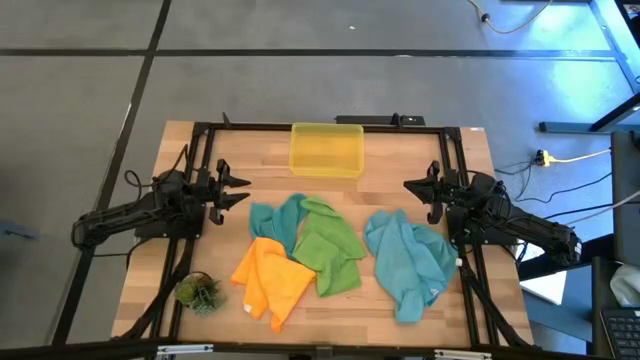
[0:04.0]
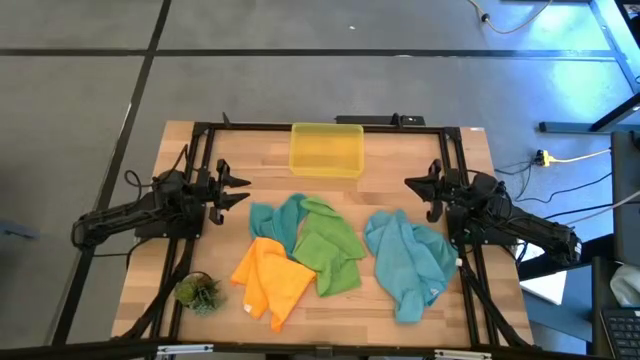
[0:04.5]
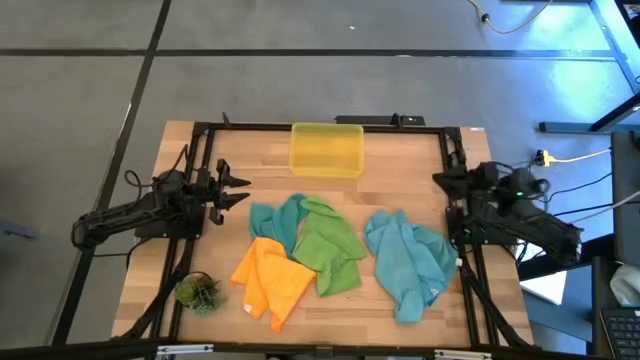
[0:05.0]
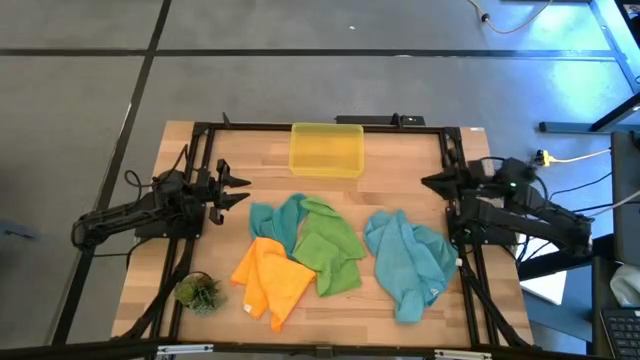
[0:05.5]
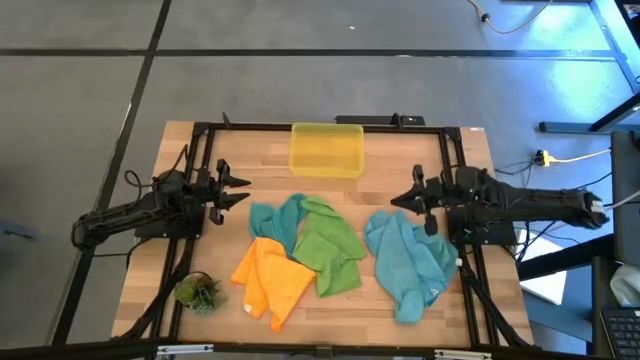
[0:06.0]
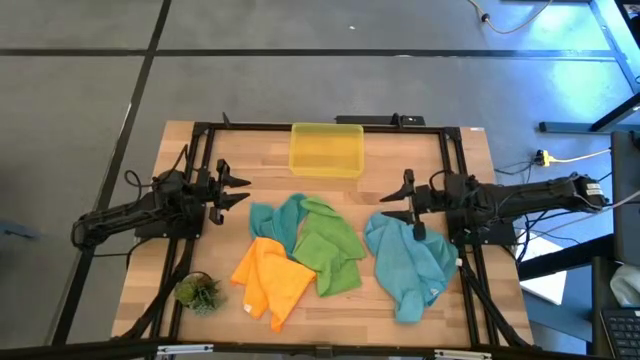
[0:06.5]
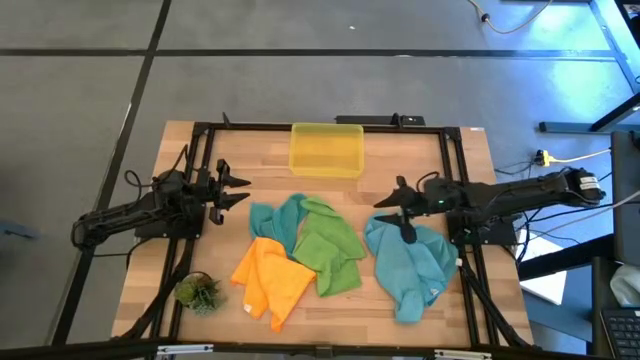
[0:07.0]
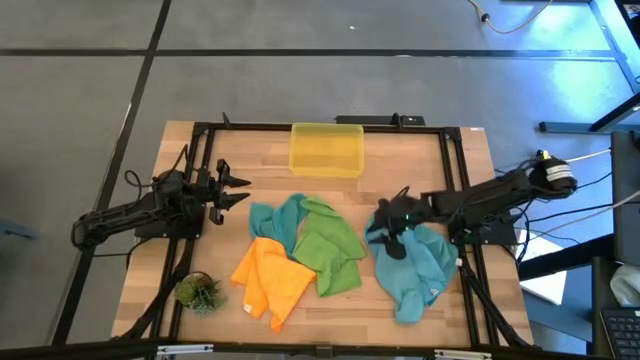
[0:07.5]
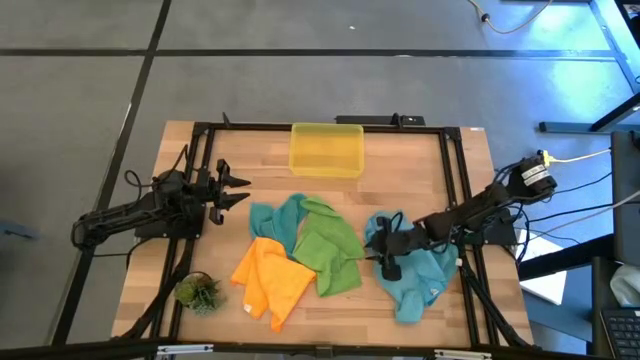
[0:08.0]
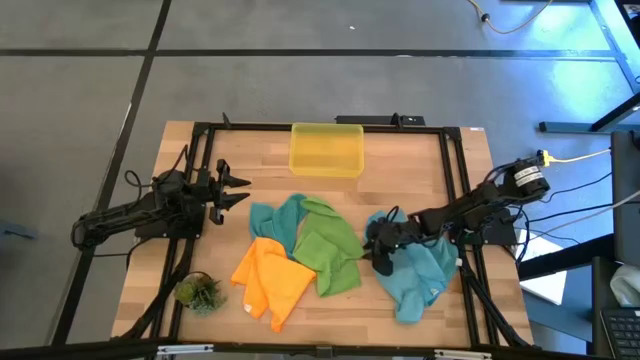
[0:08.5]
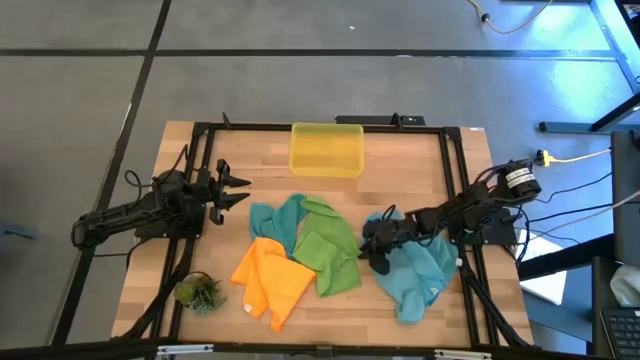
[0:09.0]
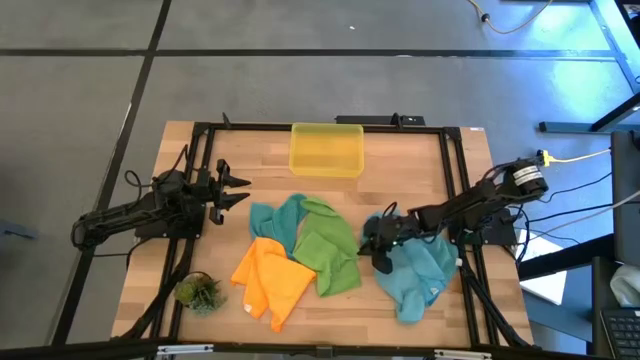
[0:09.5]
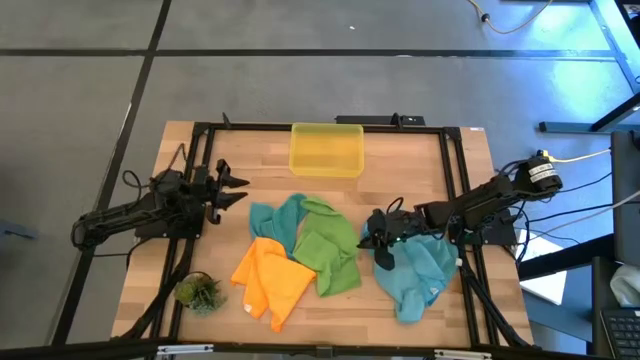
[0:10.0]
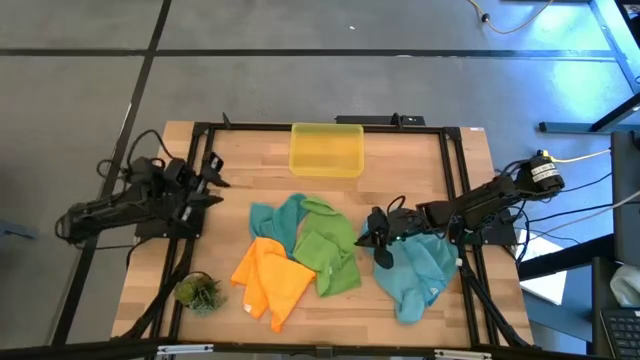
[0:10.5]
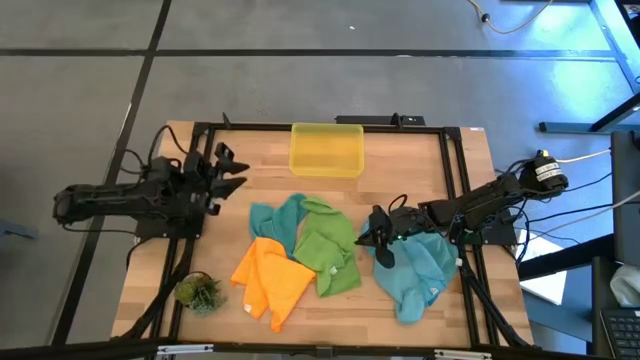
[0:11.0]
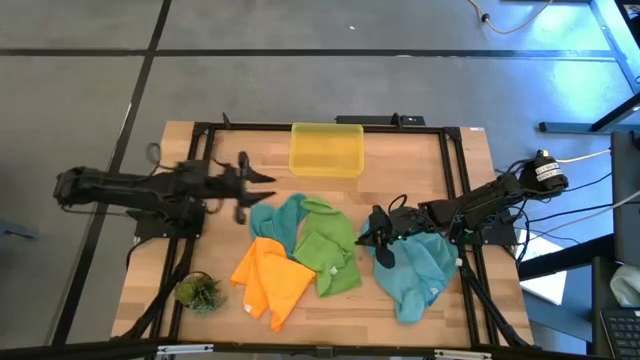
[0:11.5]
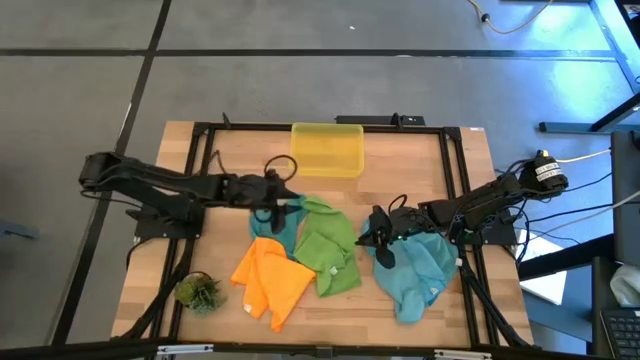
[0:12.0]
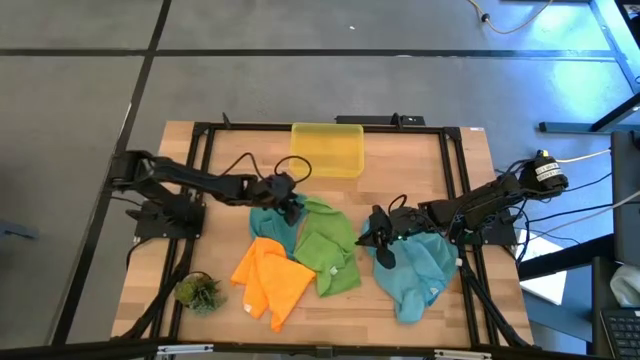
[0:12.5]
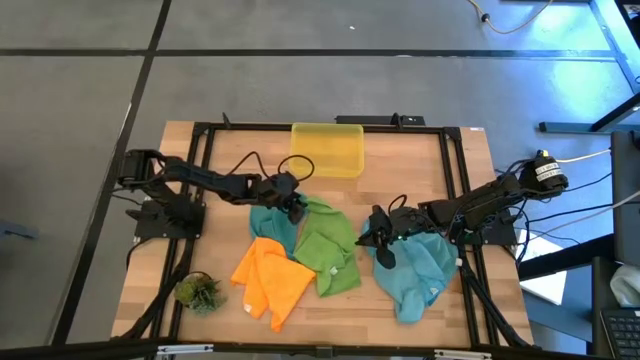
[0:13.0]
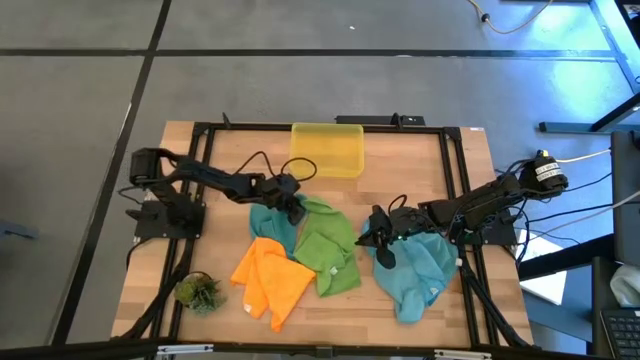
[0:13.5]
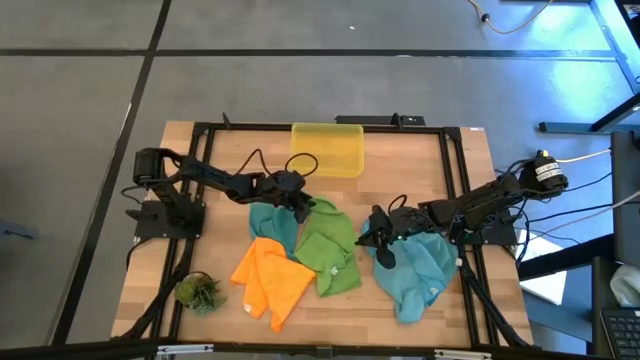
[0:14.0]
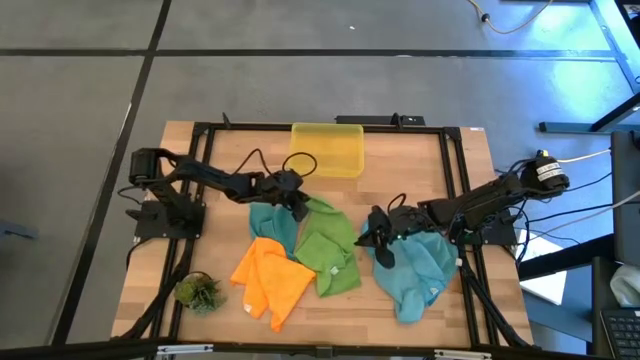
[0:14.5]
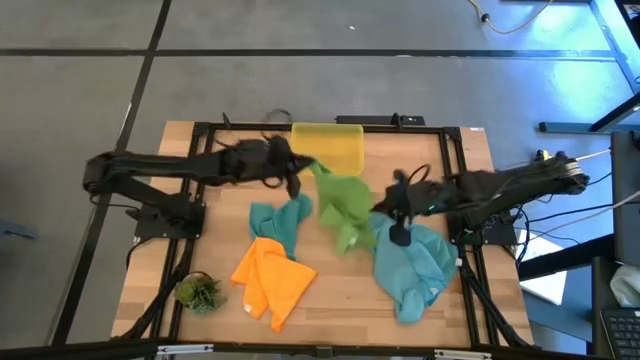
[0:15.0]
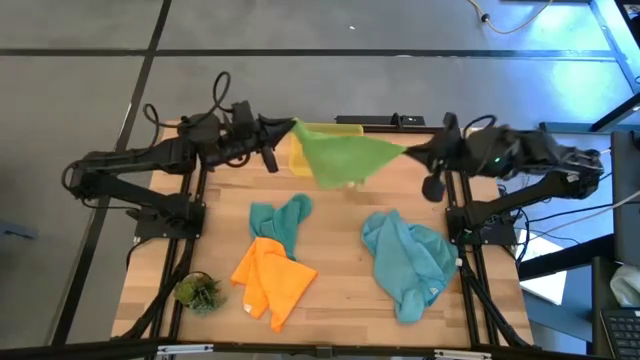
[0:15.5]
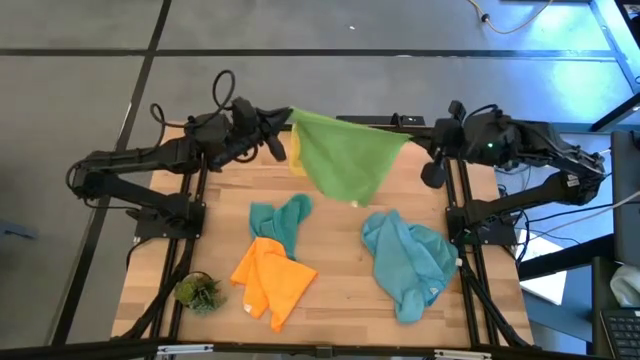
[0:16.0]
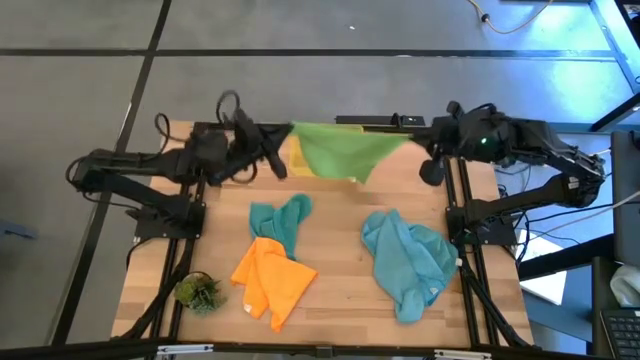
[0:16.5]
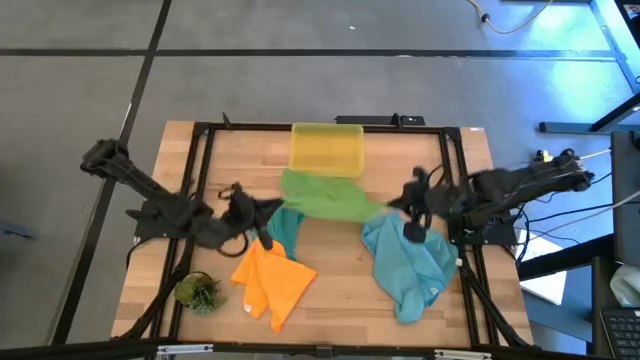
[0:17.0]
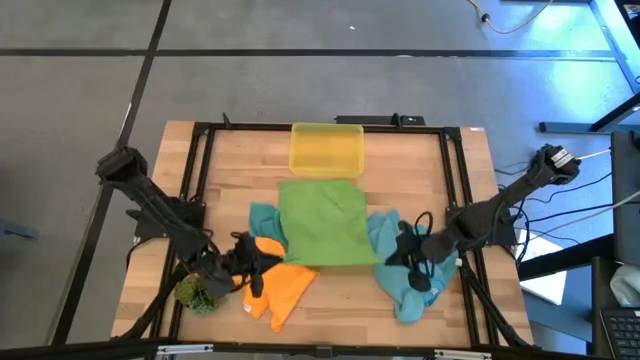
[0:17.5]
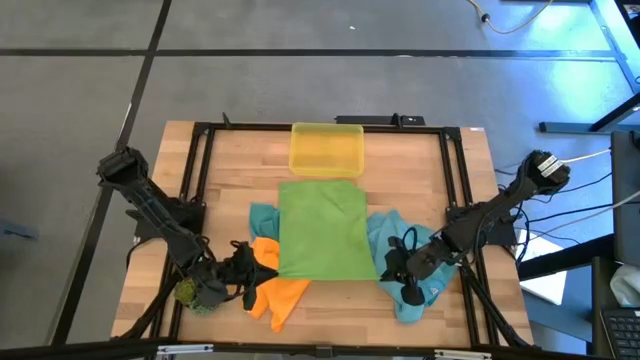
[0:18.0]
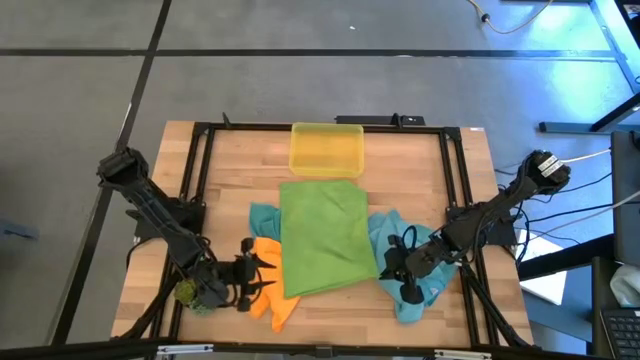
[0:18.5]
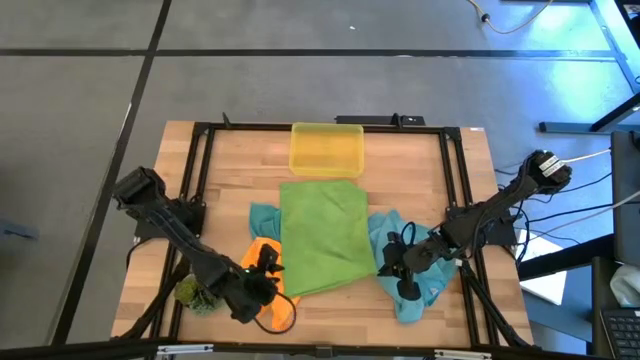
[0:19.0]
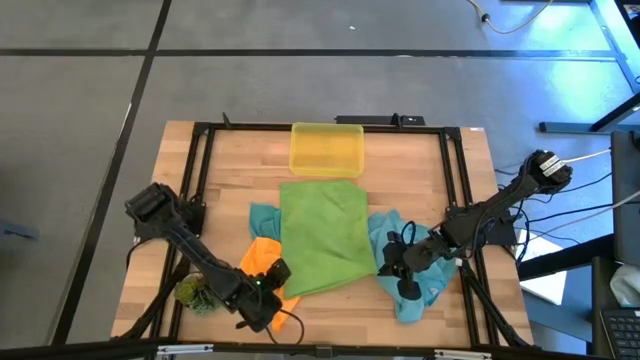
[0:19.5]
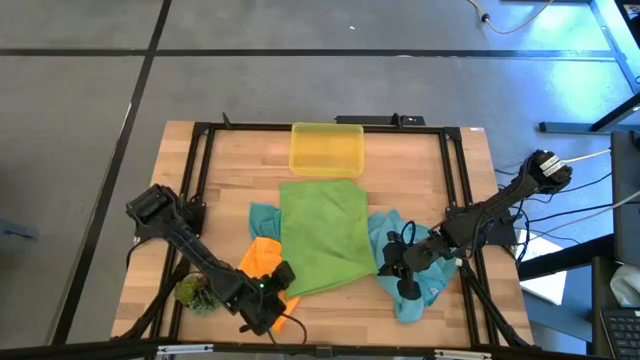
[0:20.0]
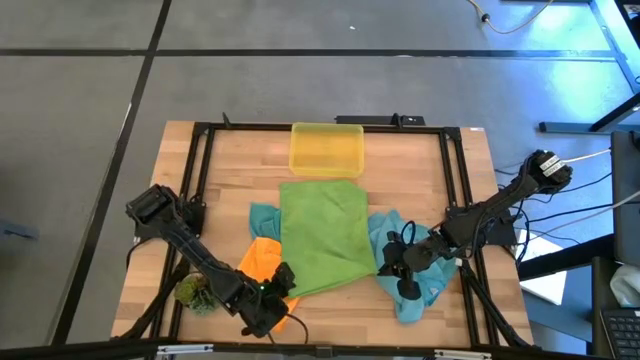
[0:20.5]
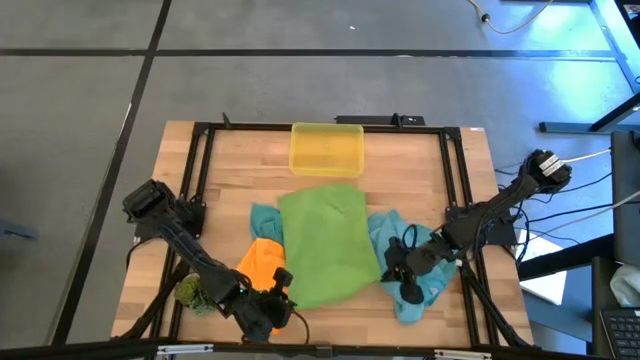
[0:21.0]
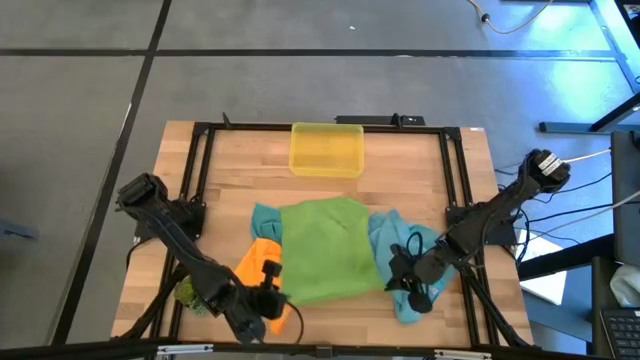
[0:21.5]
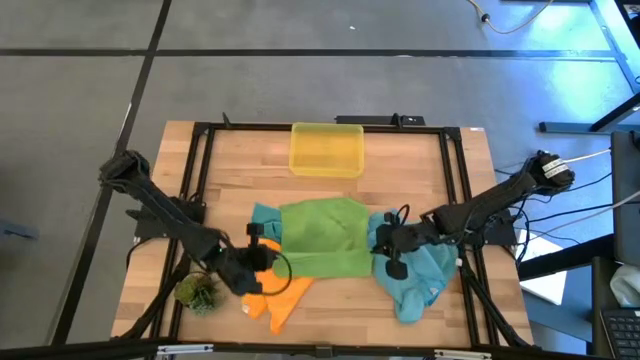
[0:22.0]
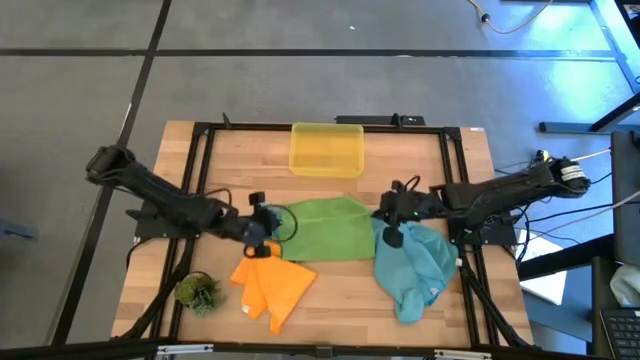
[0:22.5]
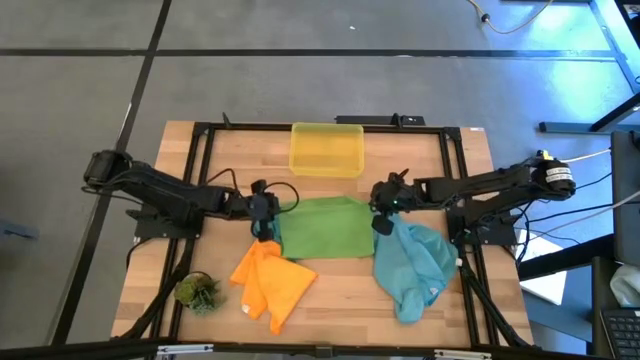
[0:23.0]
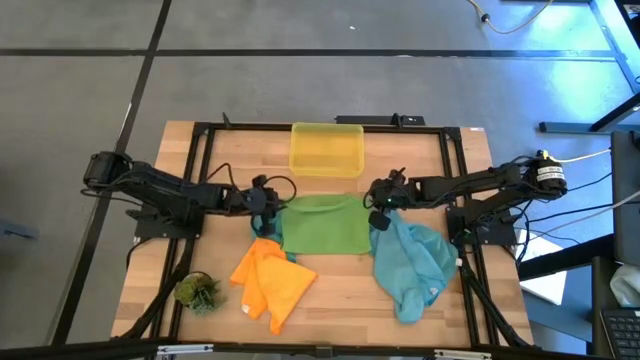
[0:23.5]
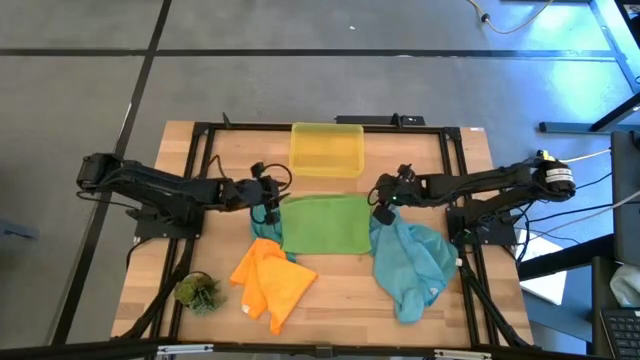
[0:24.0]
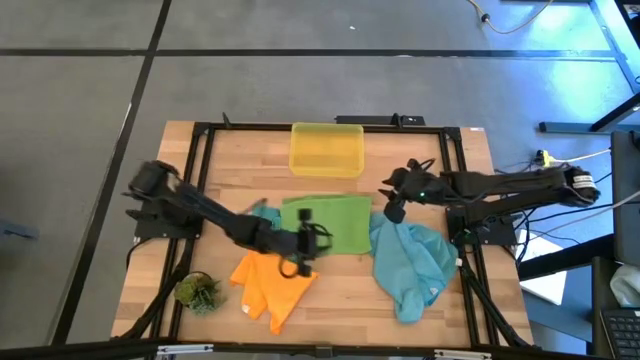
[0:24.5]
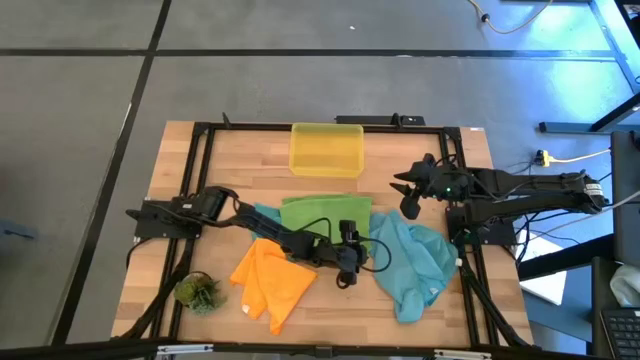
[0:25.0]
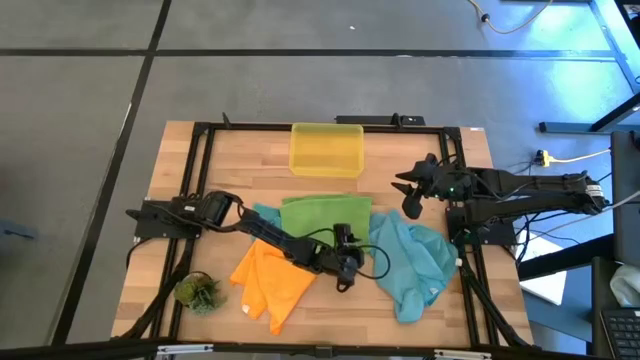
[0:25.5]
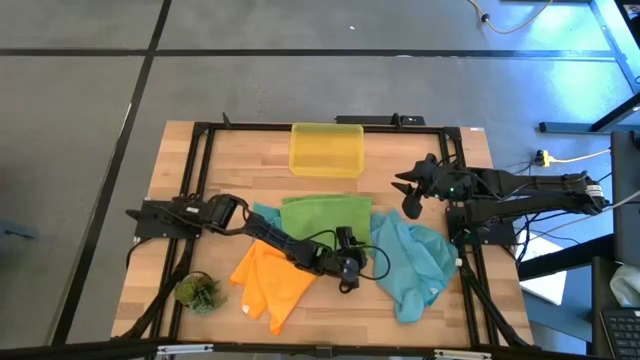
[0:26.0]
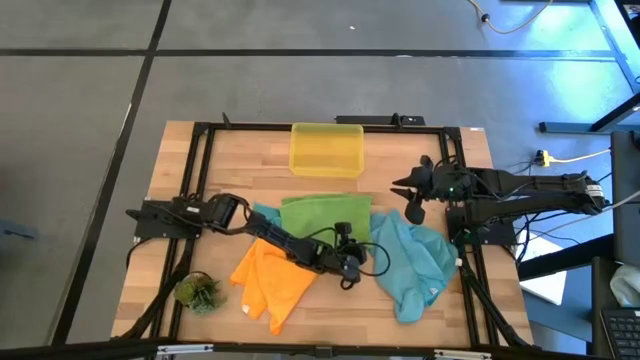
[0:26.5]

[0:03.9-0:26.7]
Task: Fold microfiber towels
Fold the green microfiber cloth
